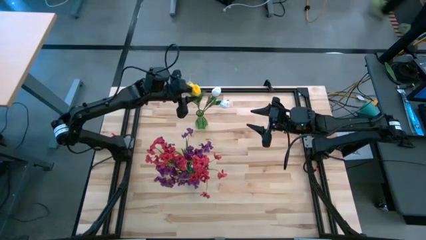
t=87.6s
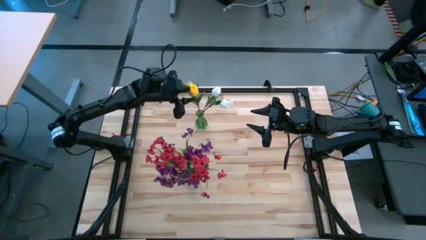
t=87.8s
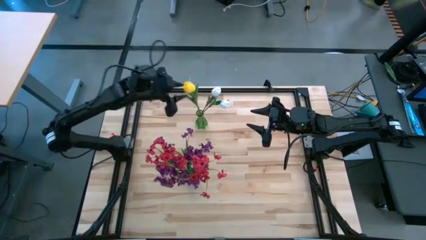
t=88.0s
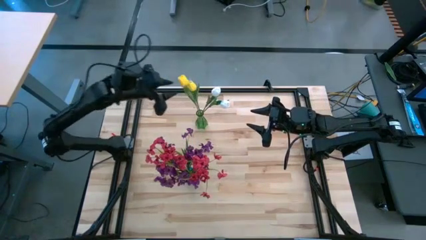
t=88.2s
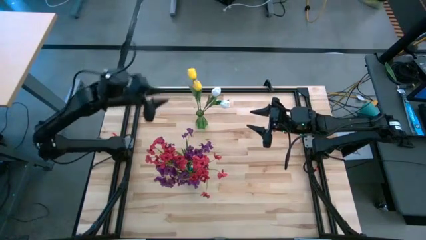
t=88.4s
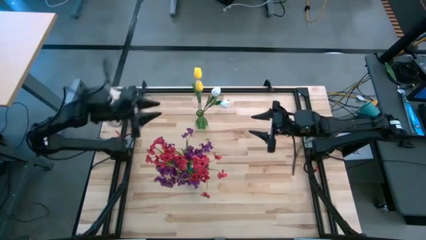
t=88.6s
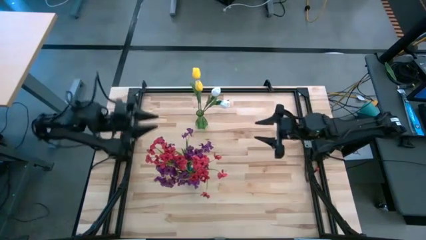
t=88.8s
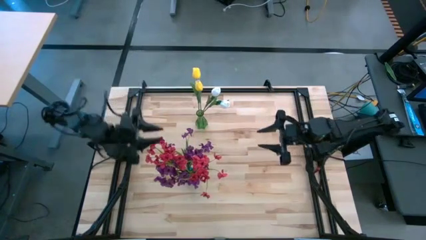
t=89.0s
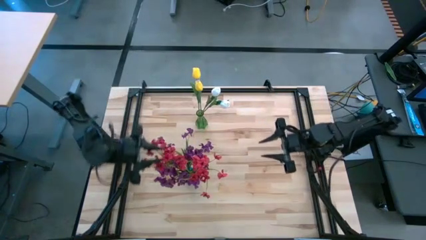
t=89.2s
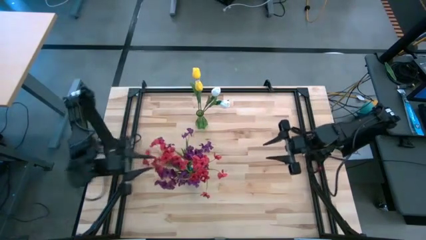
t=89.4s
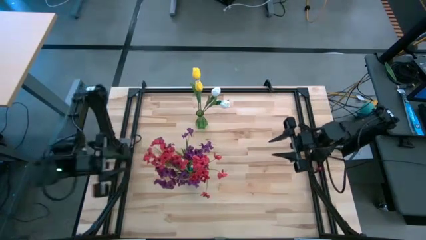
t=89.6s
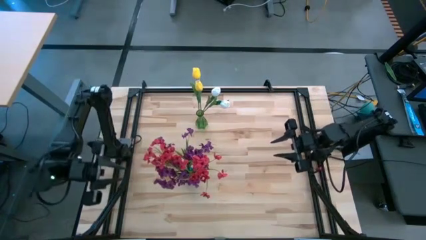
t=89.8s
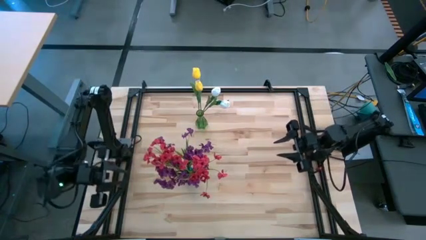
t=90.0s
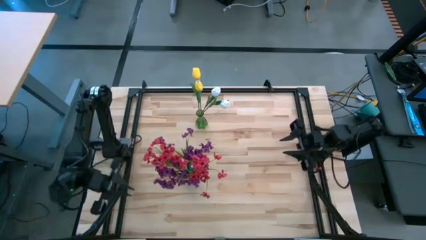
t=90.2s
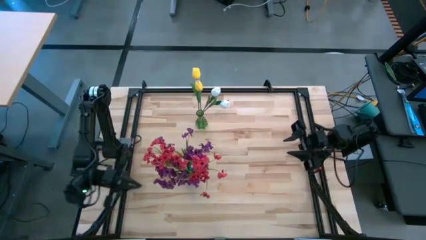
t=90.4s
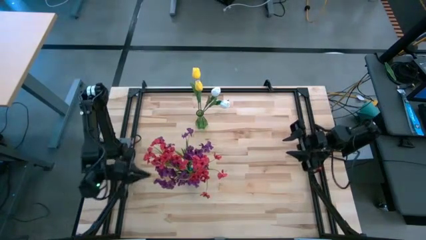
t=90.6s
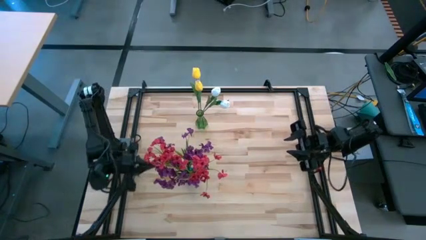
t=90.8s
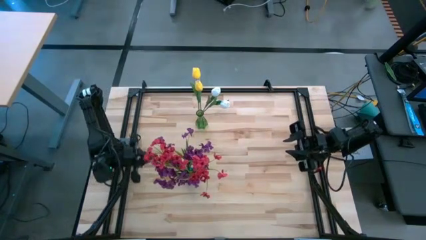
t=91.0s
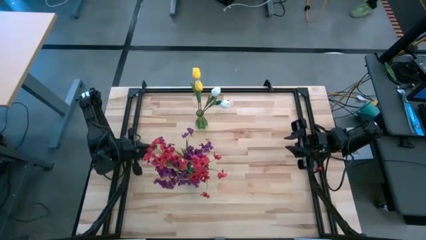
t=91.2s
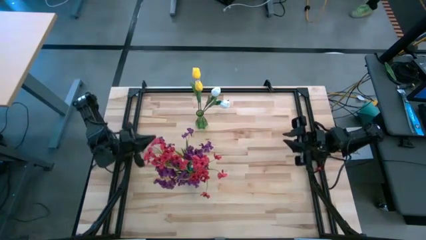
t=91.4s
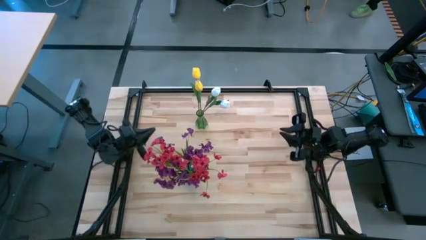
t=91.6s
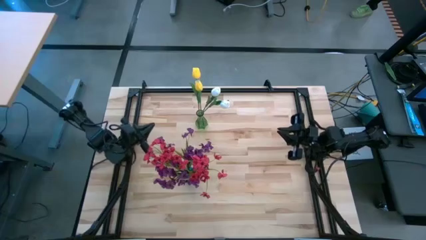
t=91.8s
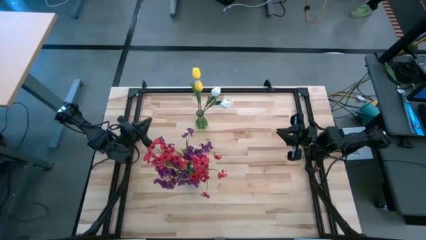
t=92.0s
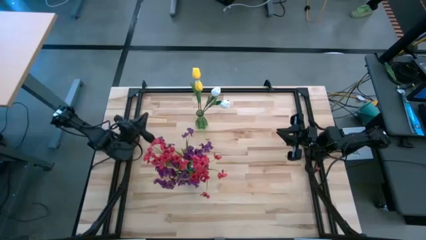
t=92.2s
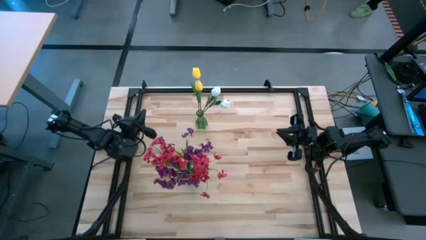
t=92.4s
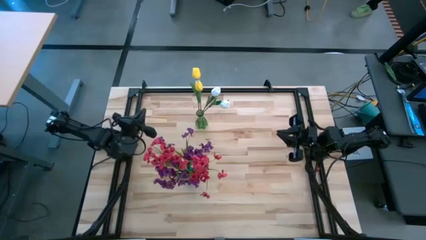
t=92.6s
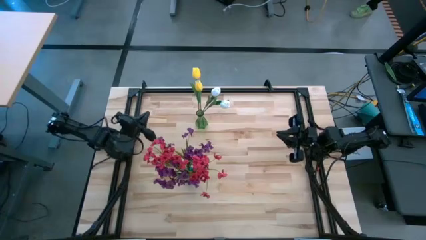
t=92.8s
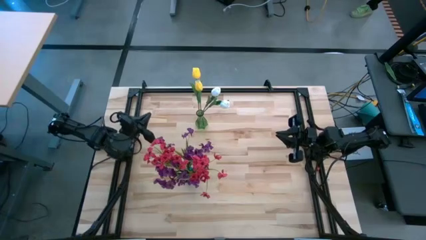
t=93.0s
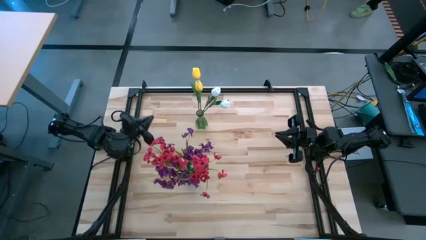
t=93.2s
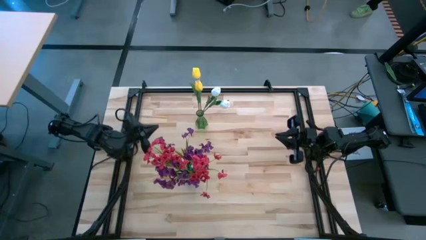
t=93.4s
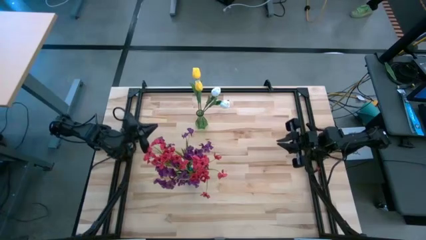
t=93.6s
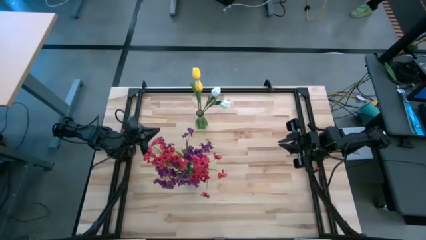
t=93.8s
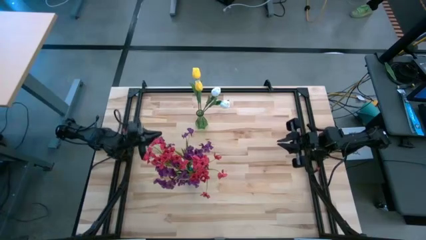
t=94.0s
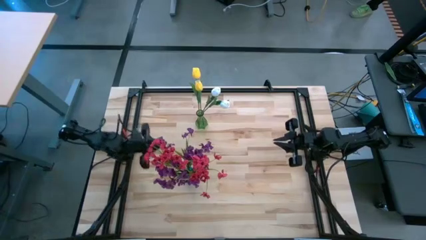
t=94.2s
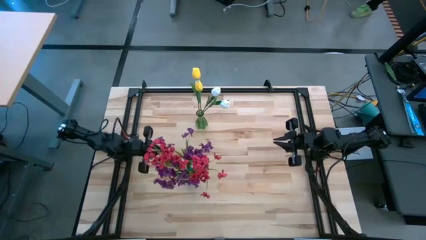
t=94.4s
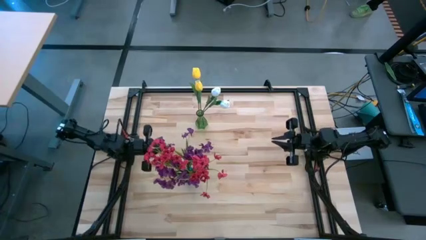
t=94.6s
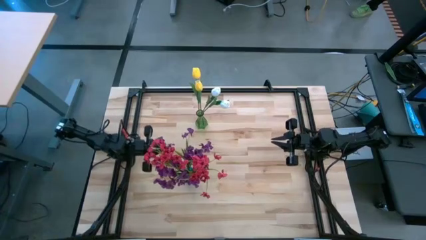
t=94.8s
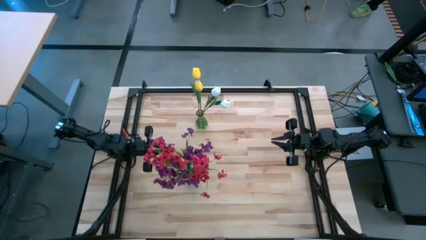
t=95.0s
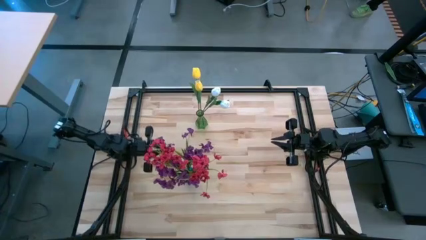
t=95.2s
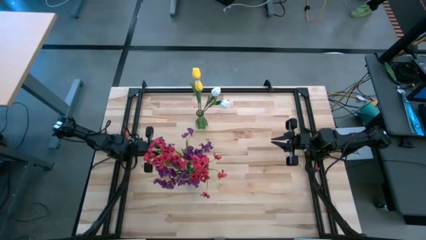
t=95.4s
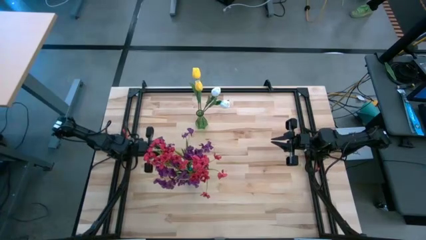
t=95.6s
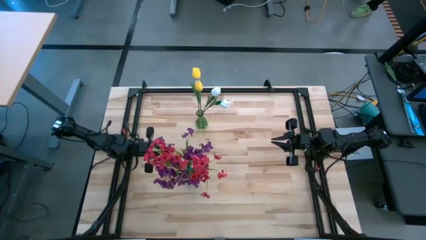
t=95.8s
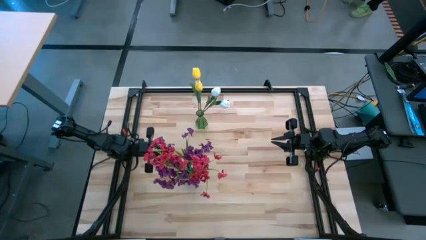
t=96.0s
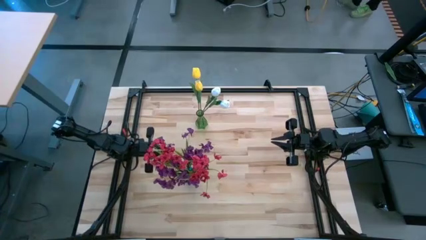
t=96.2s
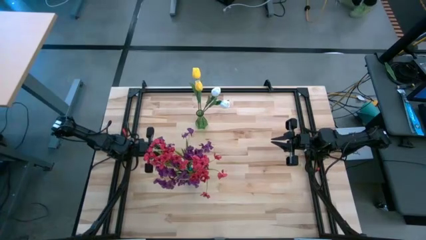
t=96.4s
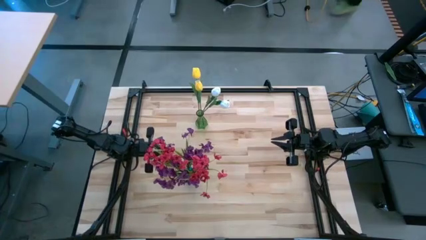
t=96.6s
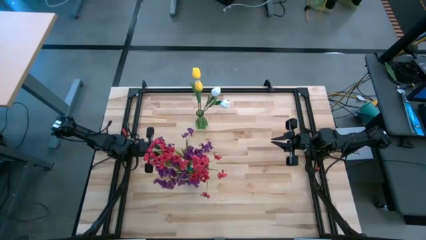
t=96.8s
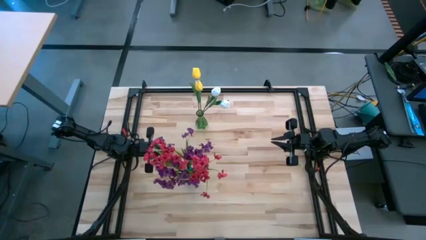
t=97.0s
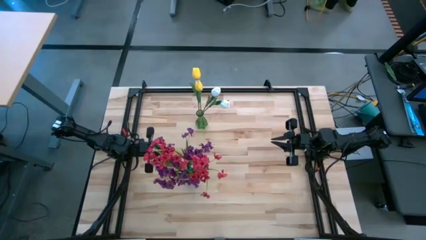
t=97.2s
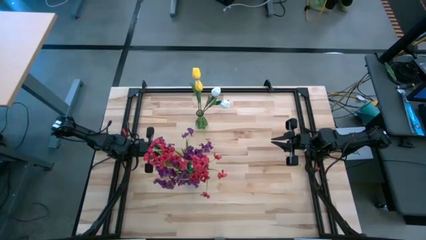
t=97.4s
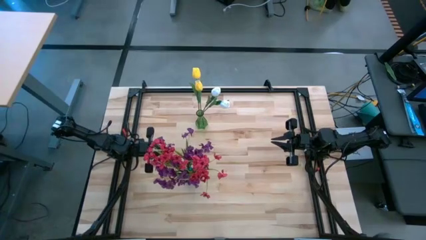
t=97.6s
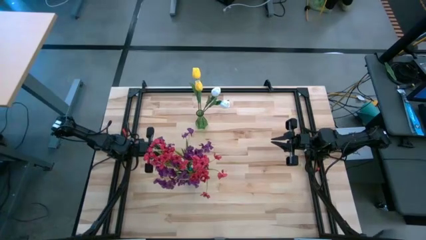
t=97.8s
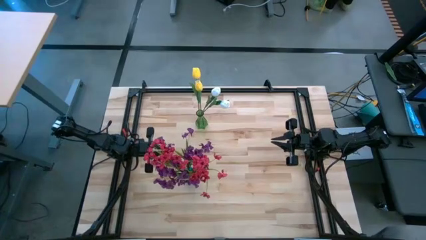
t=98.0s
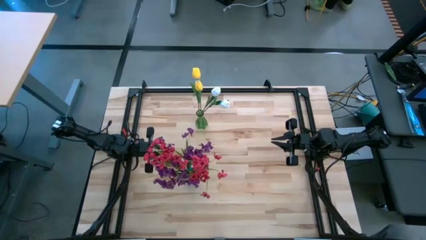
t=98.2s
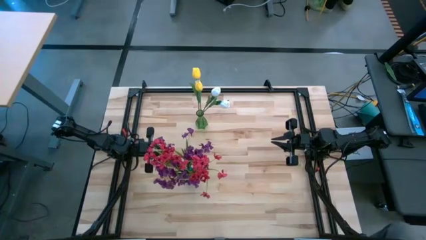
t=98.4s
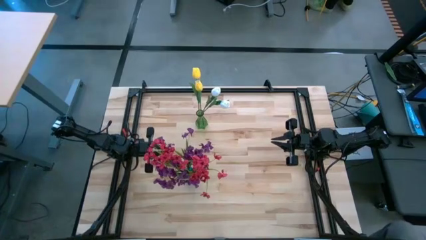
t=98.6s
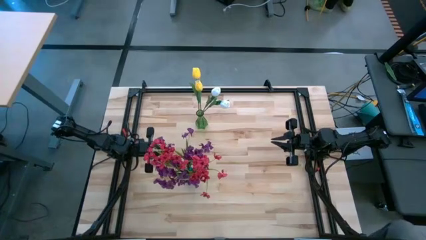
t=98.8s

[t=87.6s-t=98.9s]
Task: Sort flowers into vase by color
Return to Home Position
